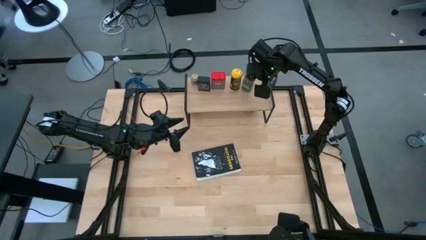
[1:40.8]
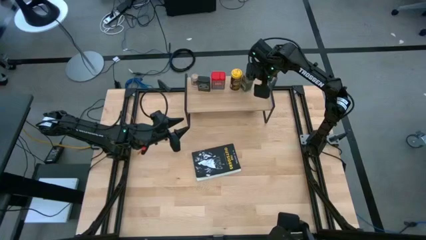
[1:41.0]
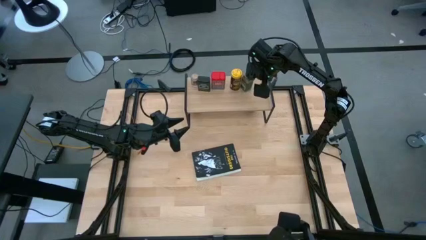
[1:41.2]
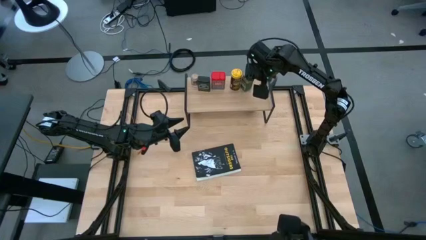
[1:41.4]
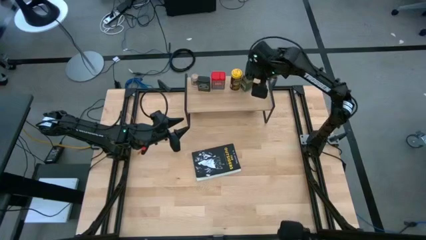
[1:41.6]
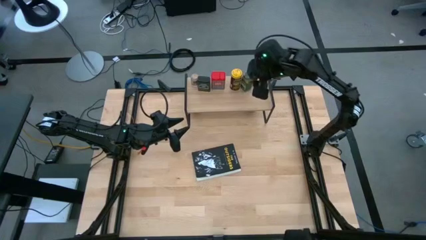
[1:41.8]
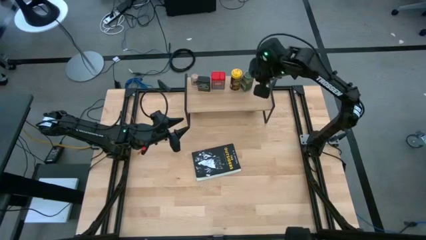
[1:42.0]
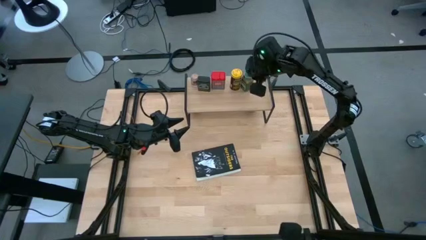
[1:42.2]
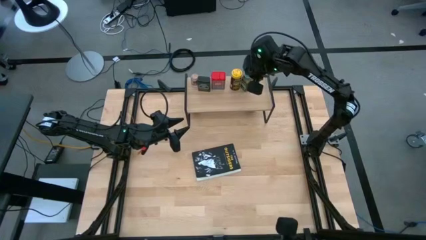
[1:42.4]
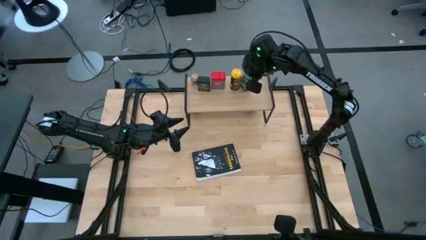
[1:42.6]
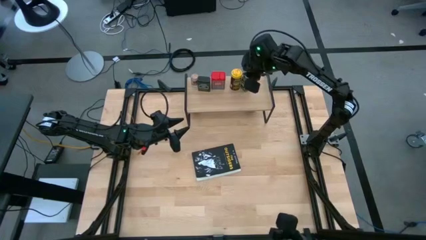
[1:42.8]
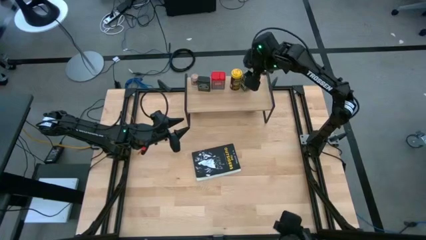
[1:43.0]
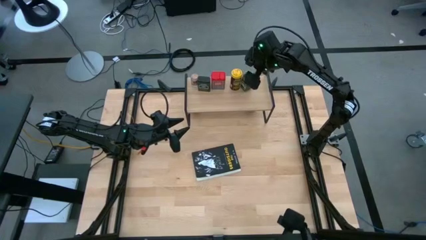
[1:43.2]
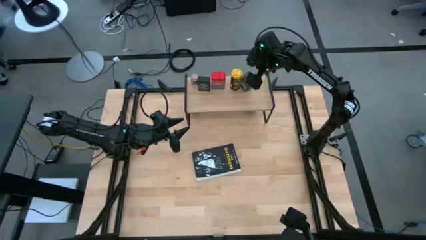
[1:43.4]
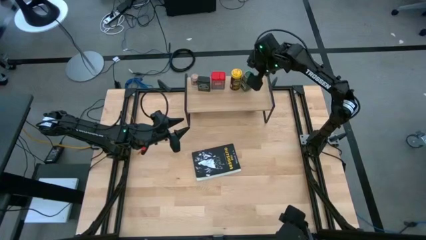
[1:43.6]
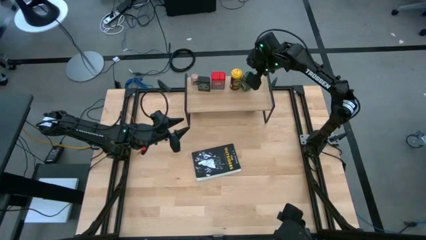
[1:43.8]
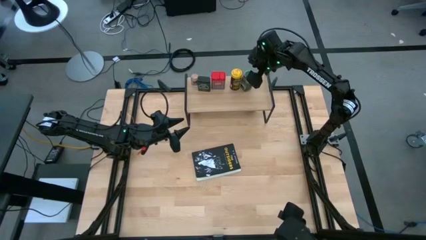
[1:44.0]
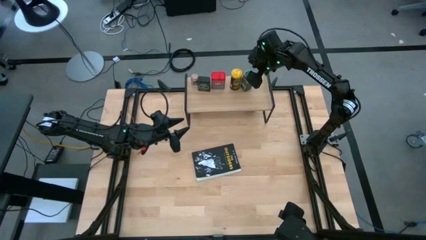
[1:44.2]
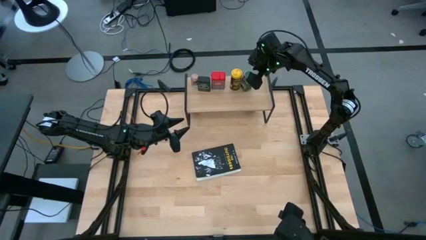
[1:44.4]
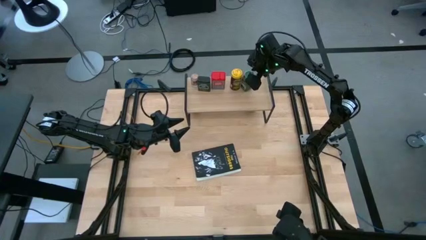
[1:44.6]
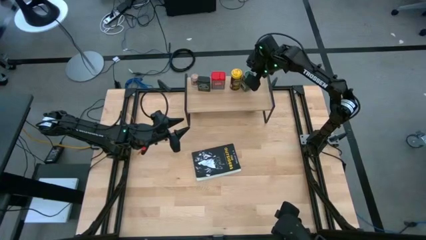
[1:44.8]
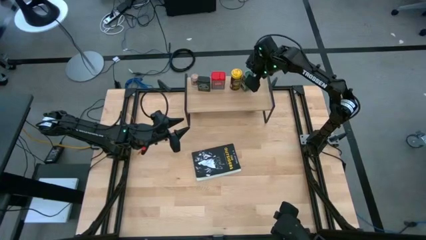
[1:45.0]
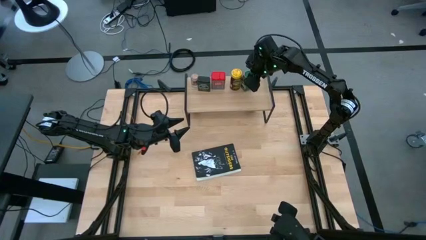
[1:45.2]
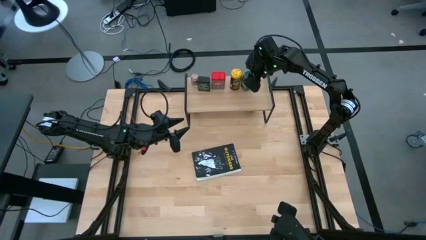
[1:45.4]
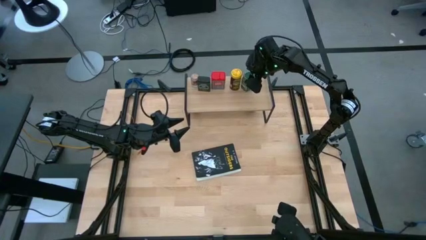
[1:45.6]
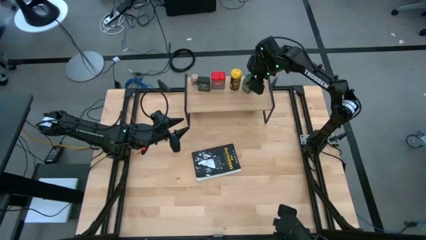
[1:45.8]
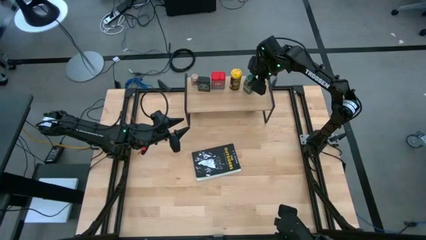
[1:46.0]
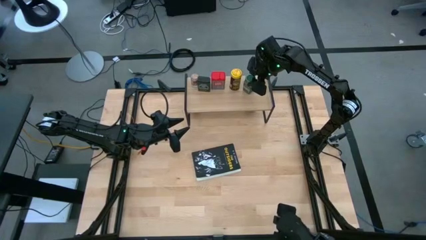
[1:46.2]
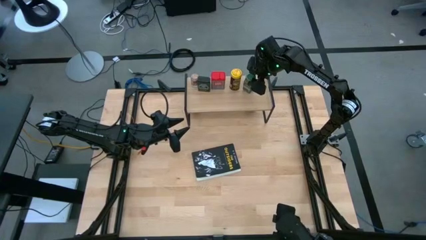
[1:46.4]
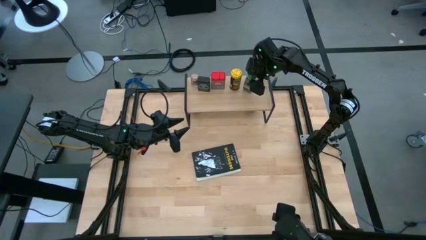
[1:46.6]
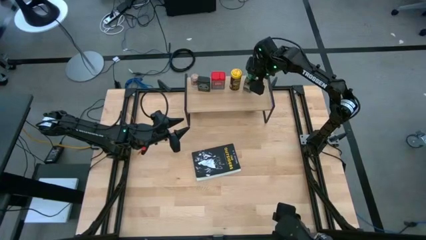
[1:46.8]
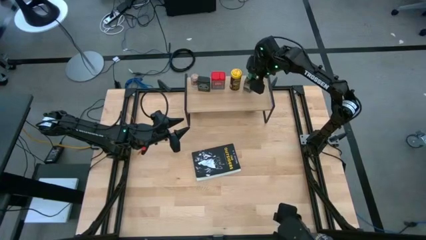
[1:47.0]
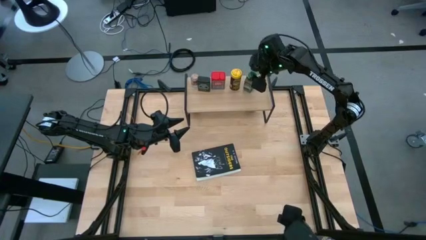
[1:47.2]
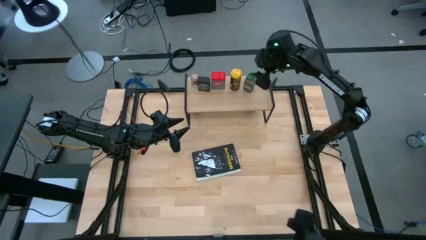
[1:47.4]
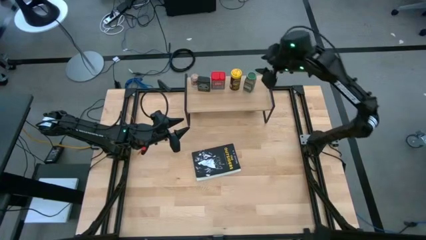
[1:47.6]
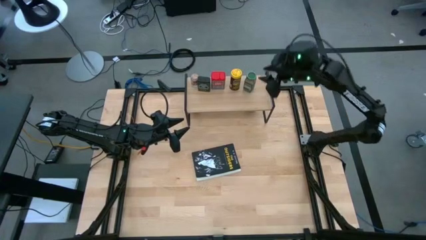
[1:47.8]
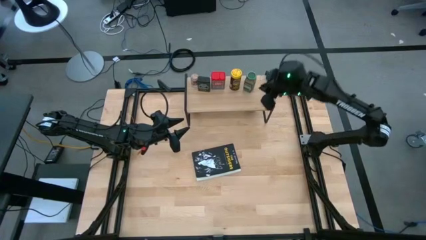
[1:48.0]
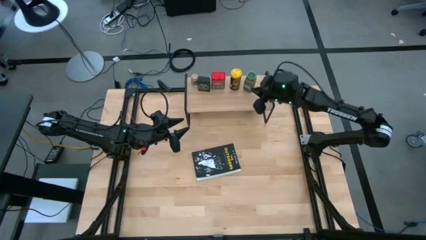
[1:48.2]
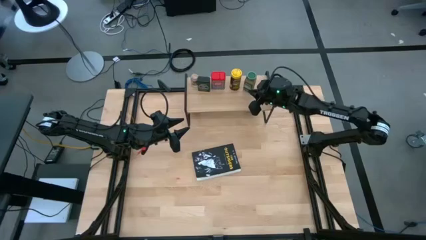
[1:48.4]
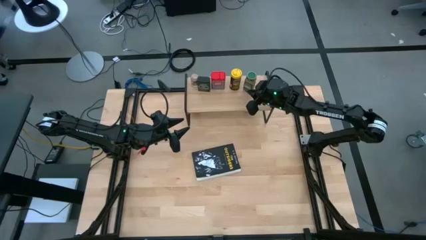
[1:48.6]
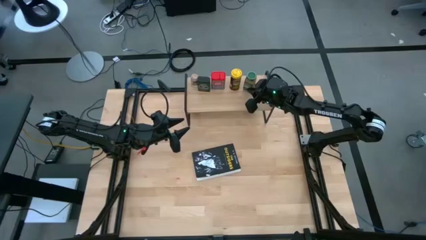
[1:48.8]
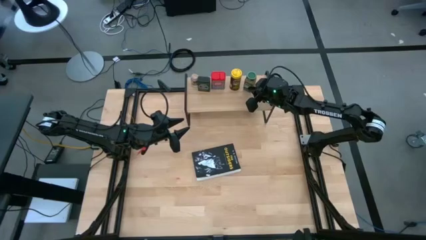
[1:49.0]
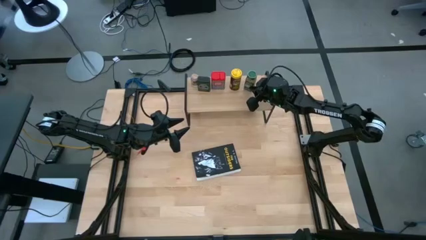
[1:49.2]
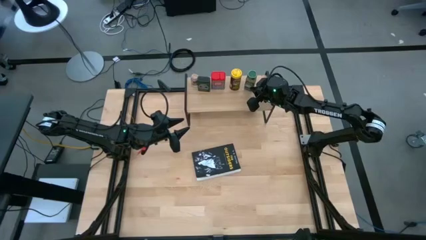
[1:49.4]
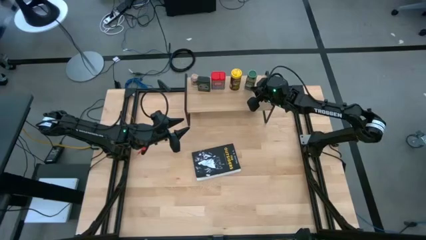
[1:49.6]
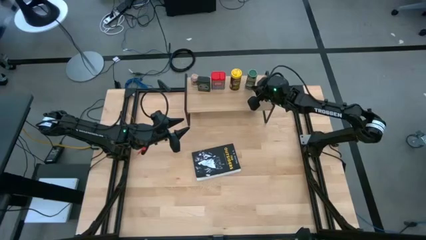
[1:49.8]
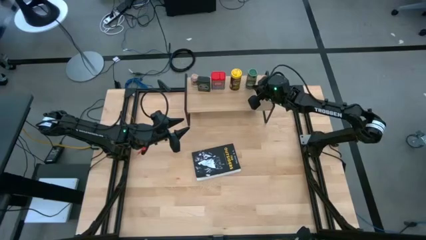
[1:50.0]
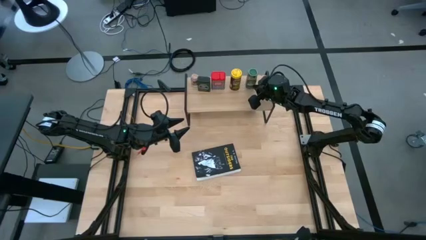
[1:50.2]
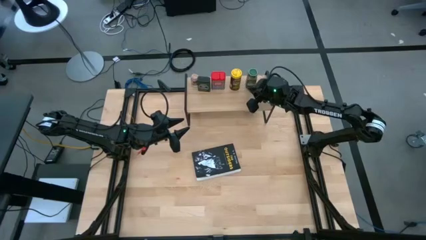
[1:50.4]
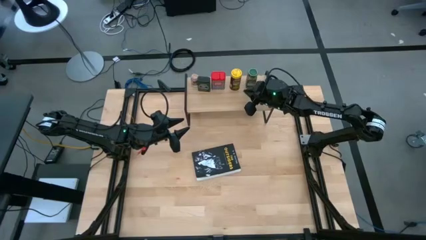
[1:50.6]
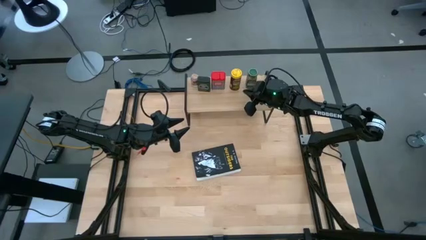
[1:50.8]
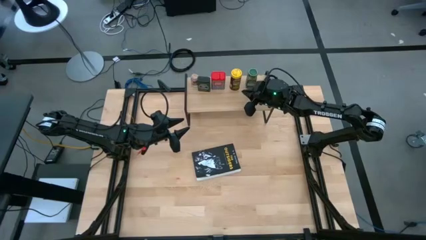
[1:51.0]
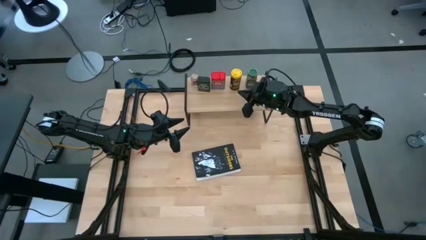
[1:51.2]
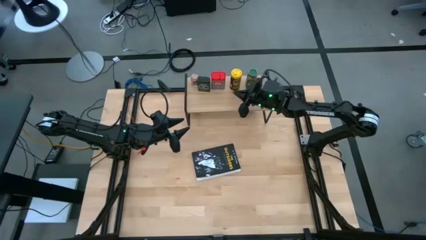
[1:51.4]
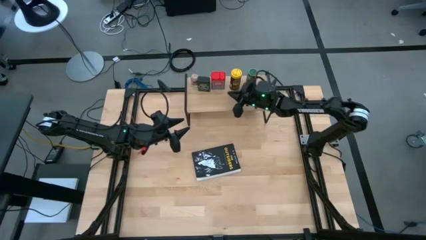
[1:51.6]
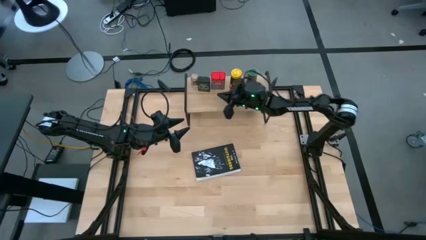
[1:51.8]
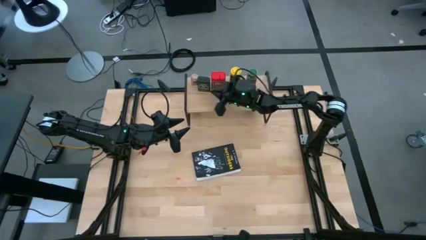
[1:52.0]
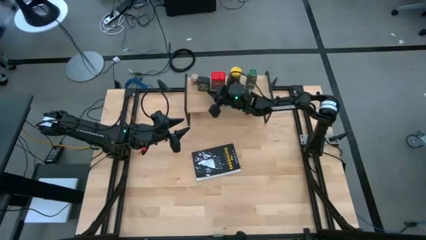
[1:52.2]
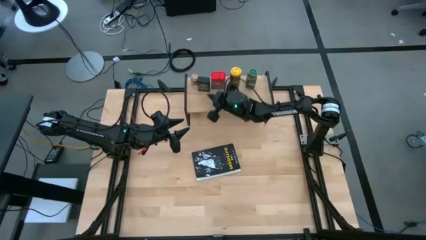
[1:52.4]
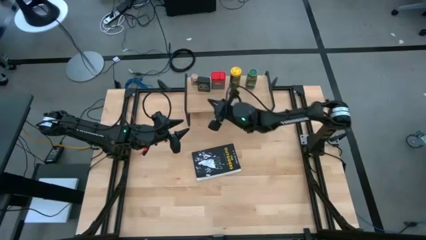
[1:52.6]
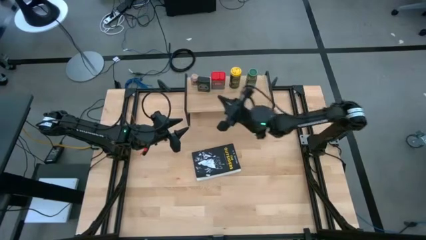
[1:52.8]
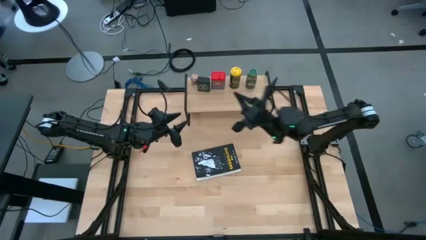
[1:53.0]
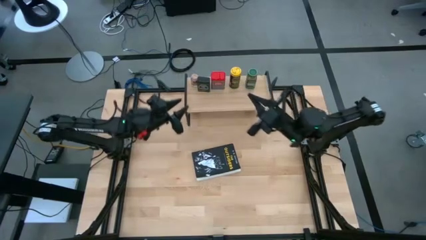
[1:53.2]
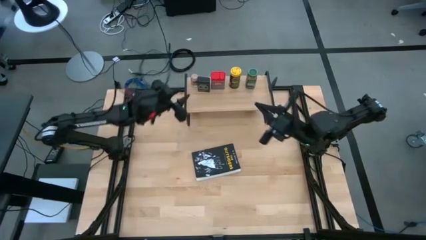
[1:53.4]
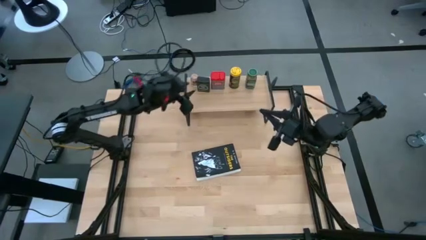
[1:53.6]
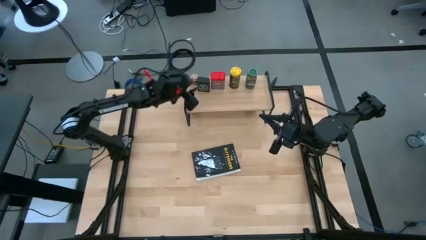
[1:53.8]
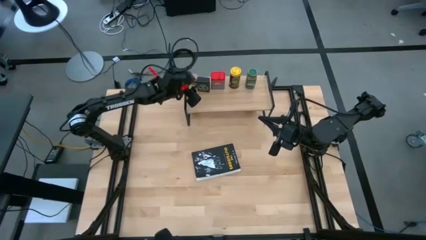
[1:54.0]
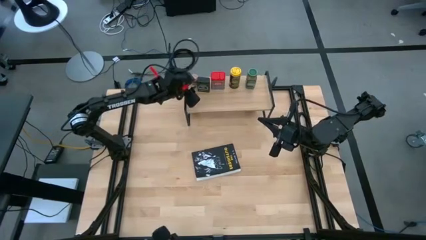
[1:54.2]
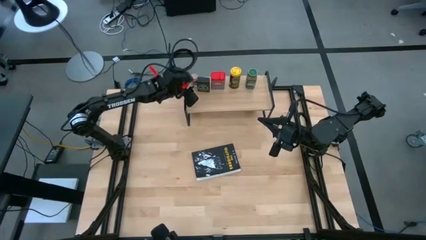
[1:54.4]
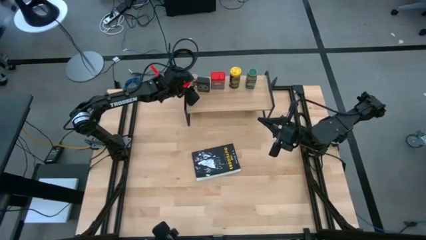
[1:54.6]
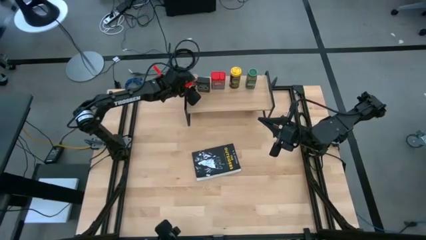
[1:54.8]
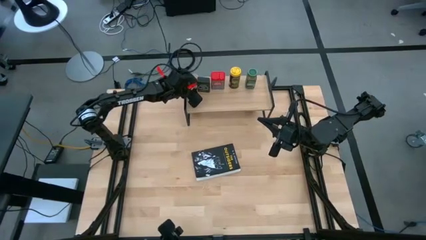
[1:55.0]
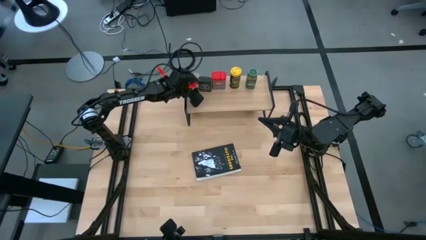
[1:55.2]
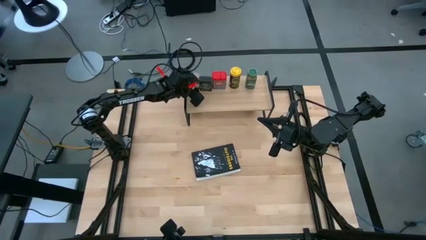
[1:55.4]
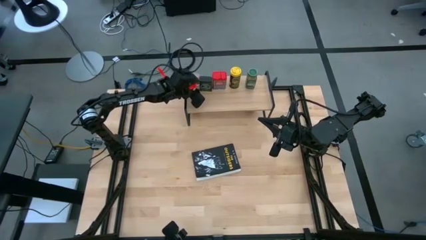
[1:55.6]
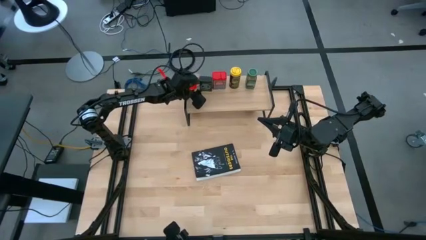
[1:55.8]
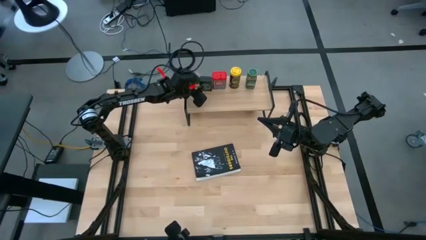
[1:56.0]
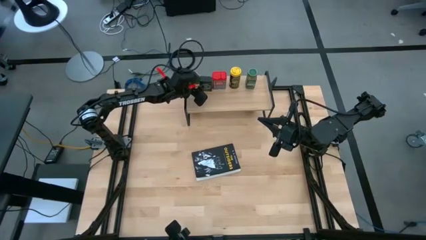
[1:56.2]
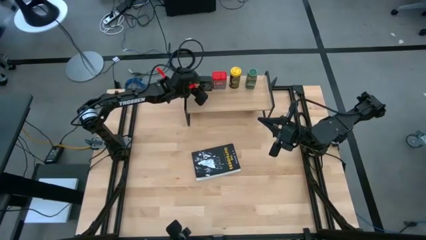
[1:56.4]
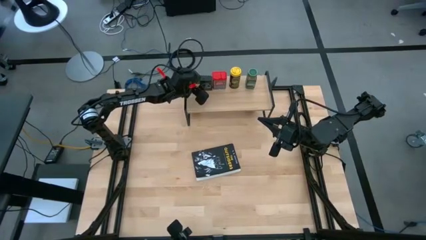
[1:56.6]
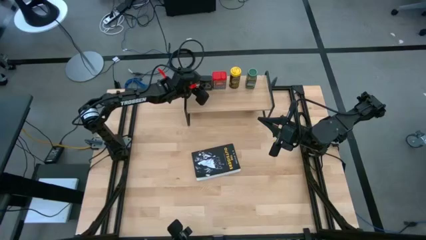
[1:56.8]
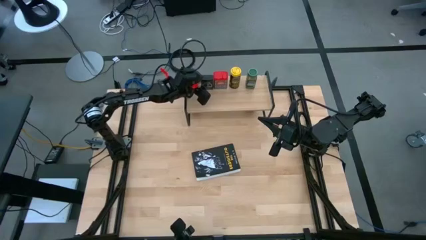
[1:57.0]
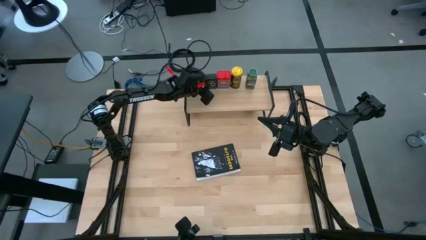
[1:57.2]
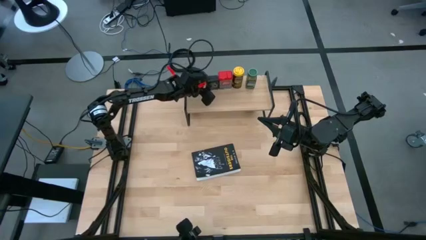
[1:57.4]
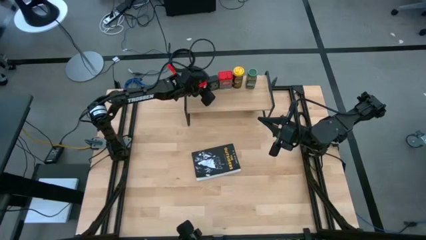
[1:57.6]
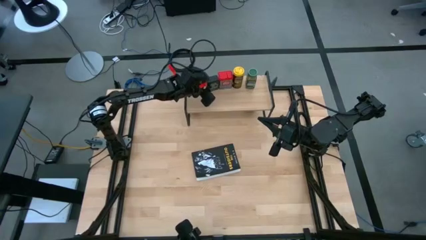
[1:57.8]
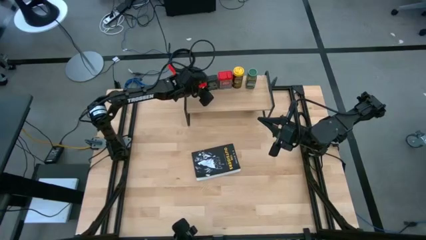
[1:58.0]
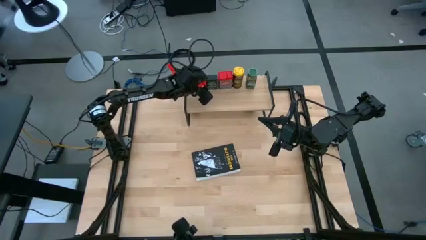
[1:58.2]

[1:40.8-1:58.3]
Task: Shelf spices
Adjust the seasoning bottles on the shelf
